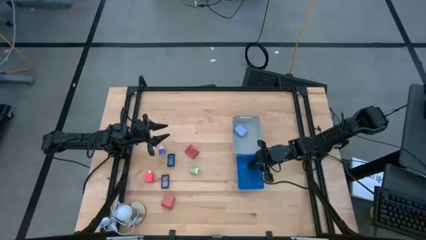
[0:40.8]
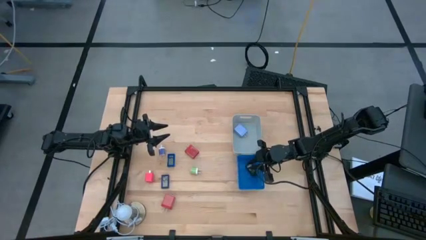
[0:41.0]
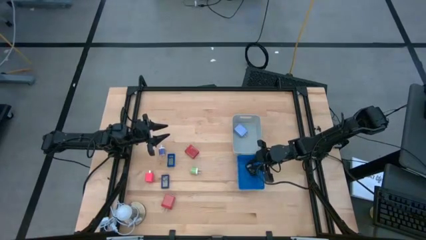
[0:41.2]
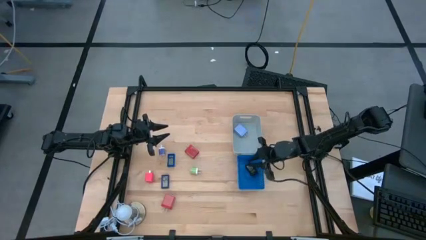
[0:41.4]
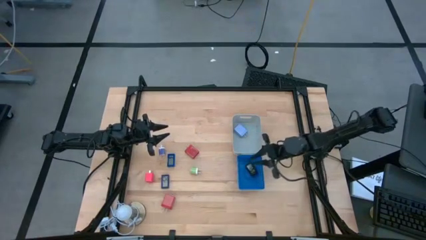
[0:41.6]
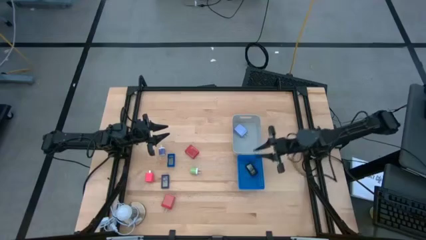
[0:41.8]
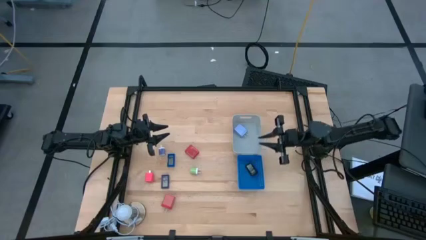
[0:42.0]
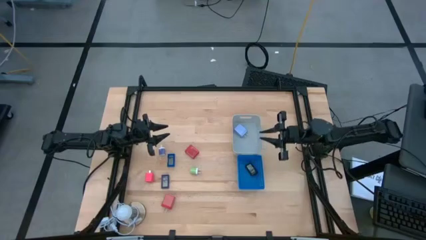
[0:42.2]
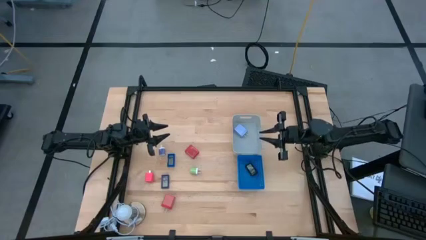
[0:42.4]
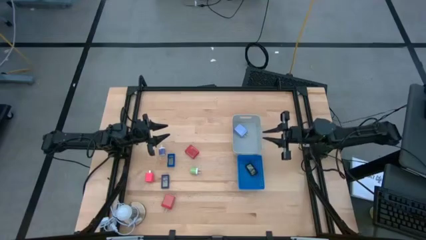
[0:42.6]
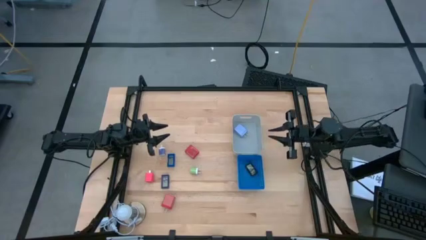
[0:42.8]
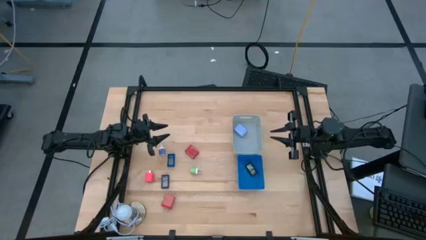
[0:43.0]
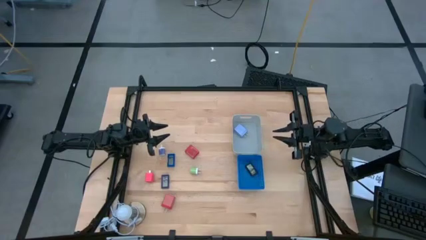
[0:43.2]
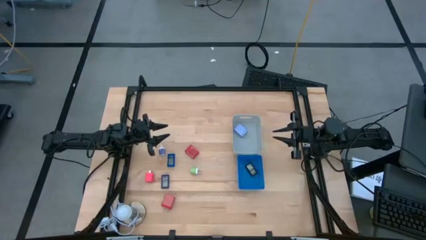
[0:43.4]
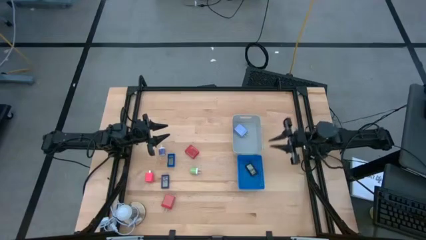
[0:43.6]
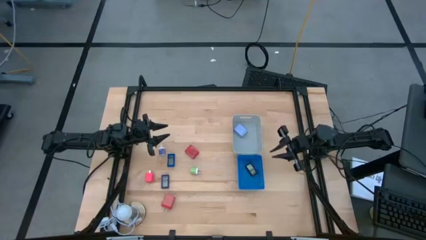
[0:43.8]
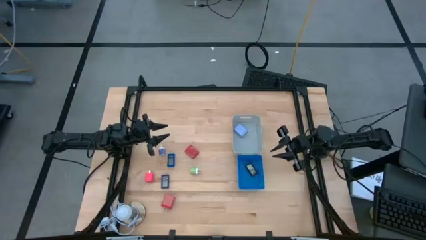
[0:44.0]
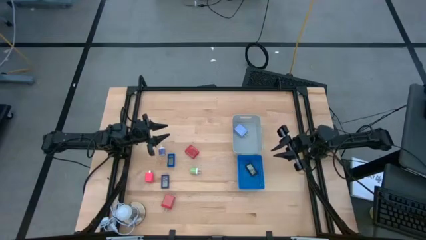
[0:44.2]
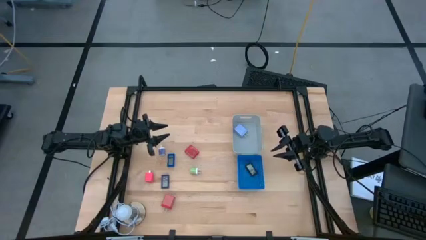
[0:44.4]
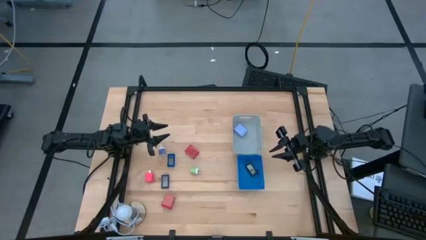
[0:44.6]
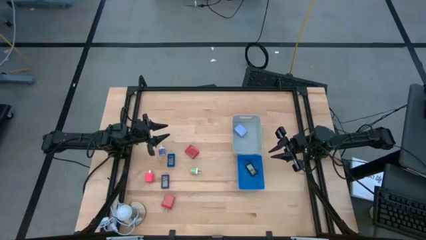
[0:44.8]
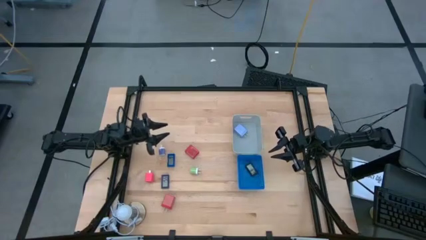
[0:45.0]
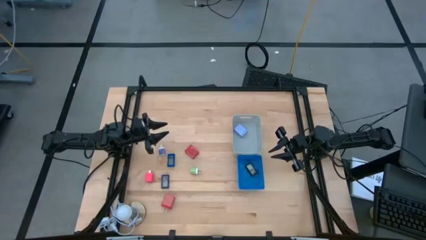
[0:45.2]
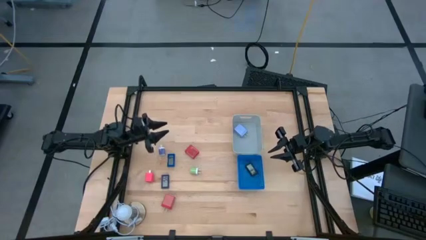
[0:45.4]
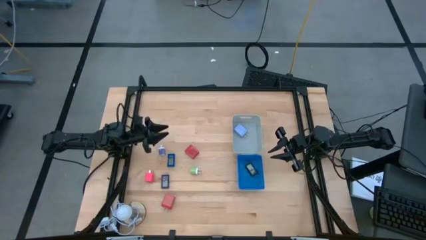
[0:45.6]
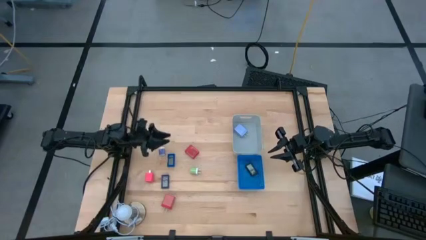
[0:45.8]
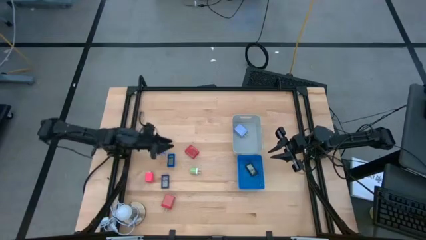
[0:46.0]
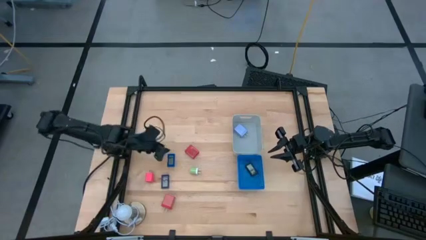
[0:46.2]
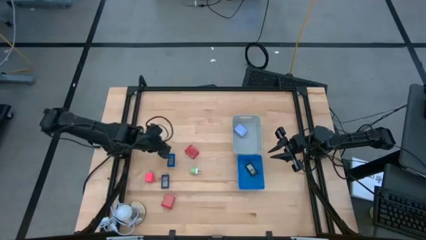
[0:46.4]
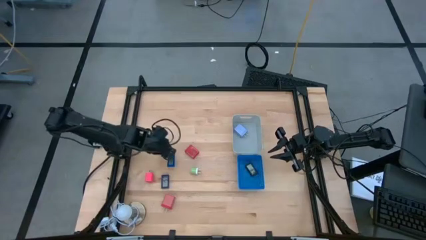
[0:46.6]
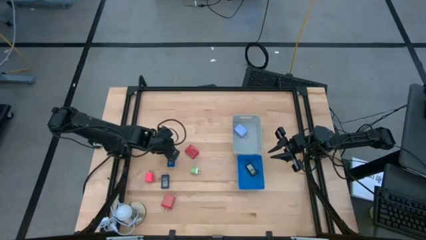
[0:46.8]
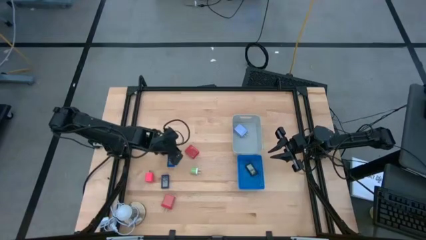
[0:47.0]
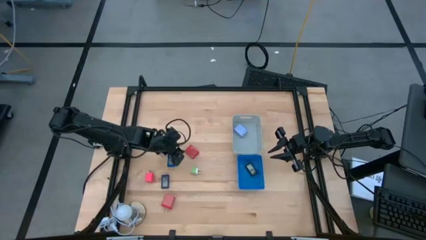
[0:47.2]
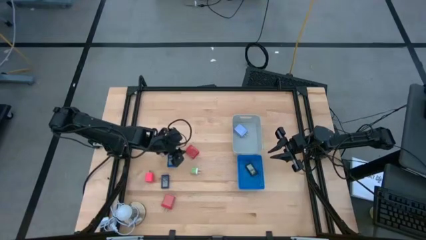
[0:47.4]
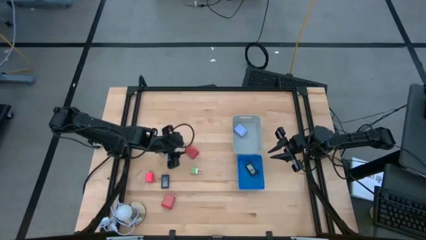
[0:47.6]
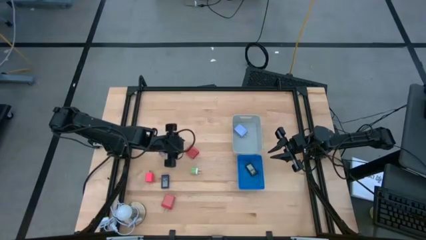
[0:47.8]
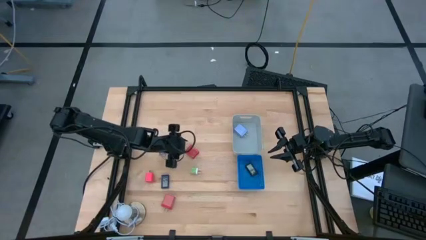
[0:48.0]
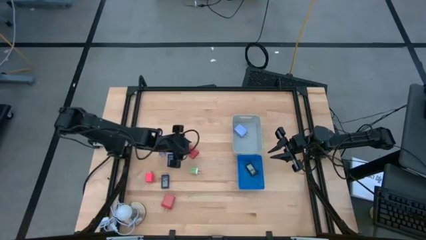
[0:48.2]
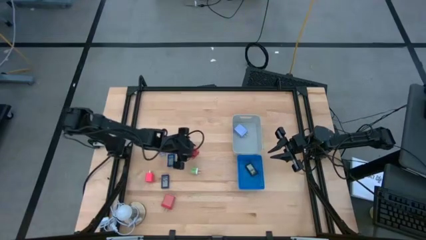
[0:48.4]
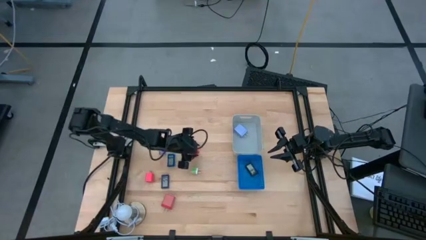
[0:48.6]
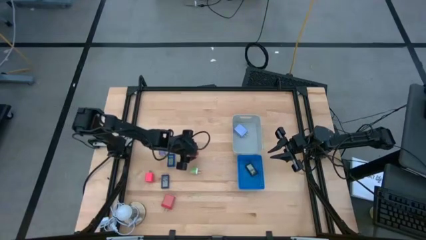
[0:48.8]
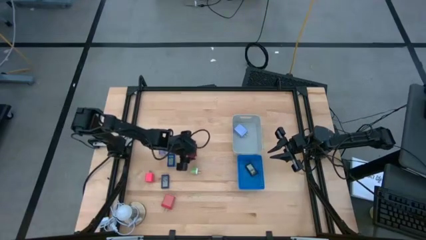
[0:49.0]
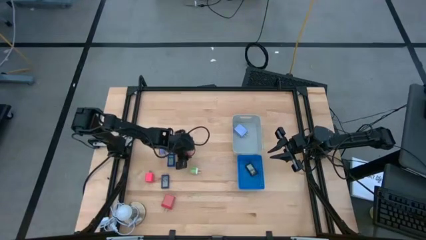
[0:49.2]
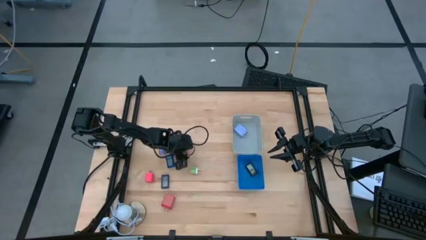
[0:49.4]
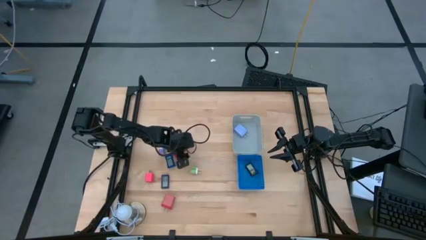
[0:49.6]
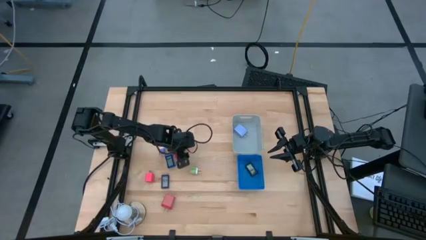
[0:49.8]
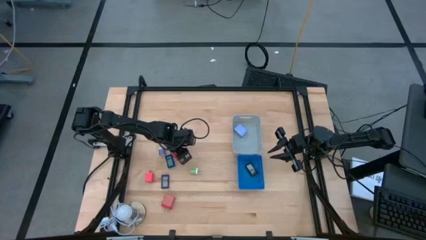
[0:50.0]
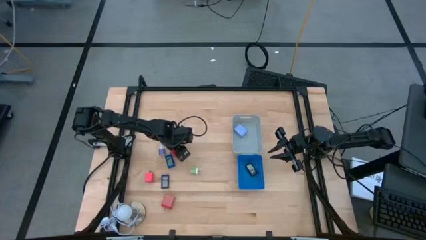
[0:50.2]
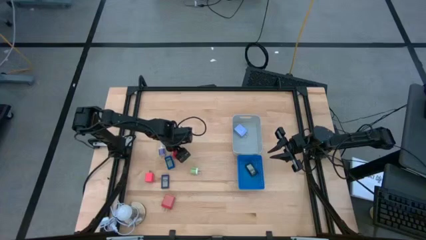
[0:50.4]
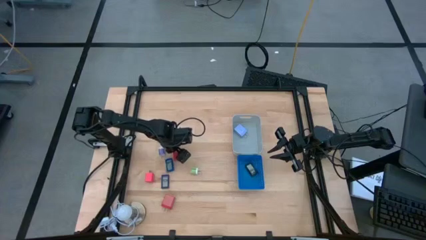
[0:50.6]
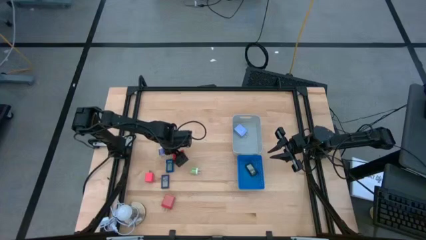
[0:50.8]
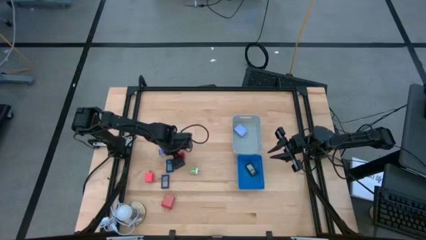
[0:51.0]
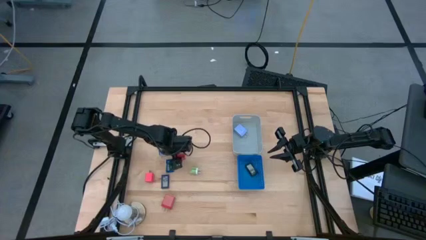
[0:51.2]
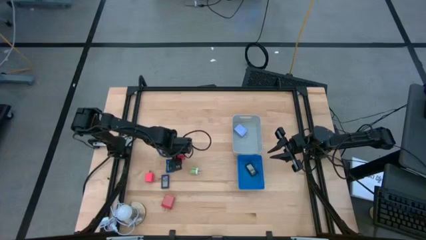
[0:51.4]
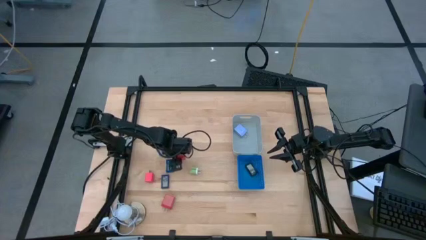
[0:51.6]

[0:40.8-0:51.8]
Task: Pick & Place Office items
Put the top red charger adapter into the gray bin

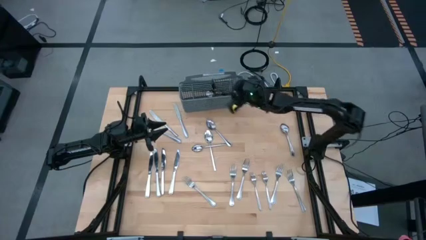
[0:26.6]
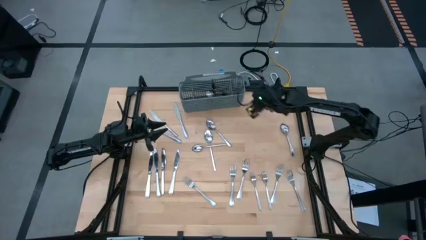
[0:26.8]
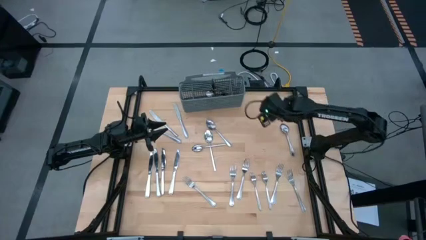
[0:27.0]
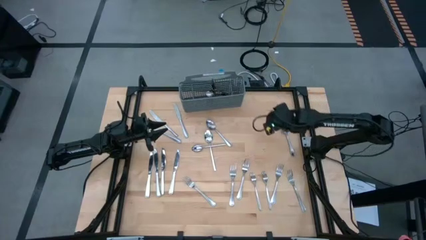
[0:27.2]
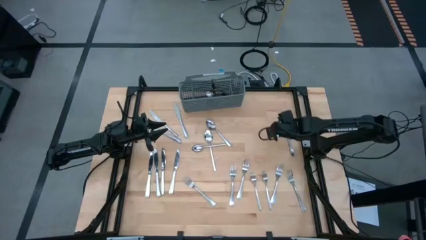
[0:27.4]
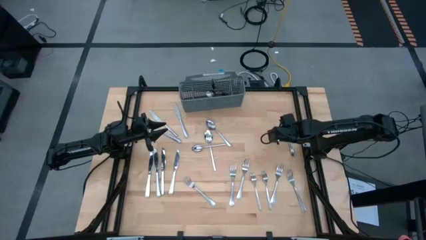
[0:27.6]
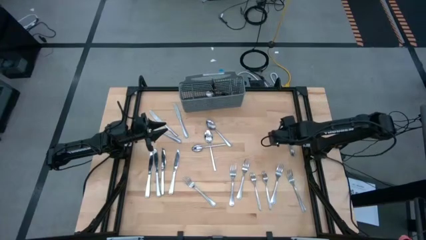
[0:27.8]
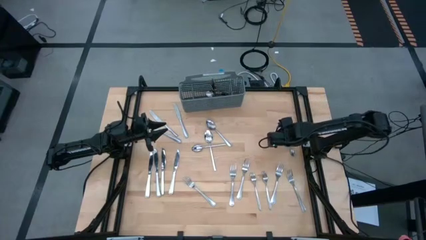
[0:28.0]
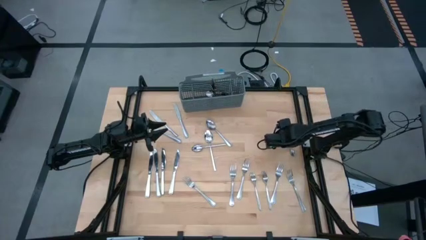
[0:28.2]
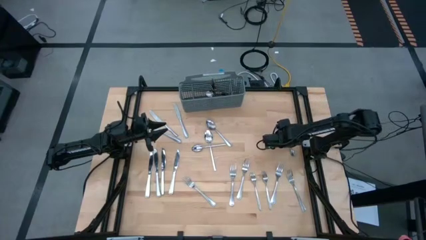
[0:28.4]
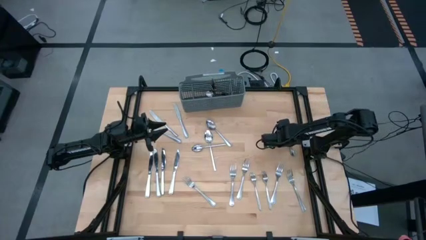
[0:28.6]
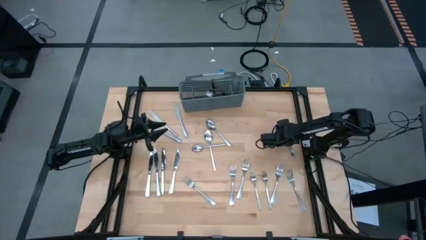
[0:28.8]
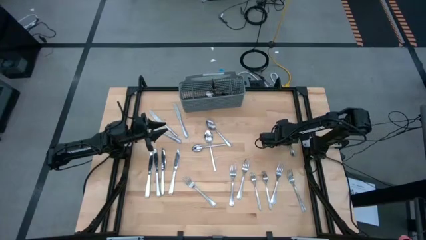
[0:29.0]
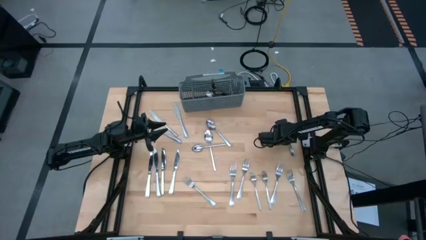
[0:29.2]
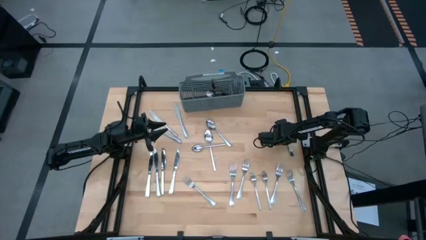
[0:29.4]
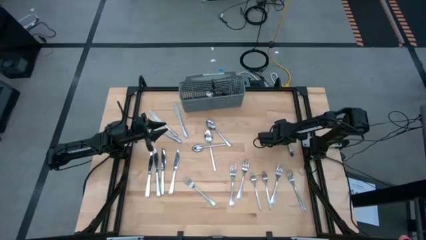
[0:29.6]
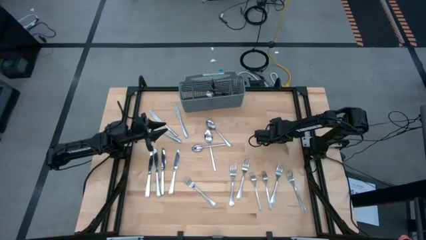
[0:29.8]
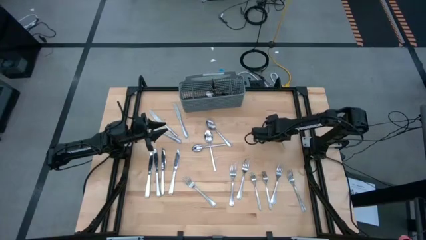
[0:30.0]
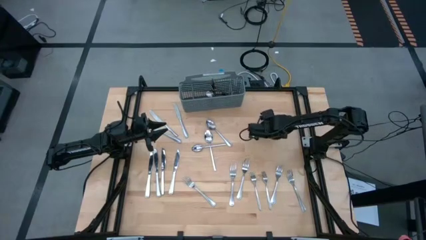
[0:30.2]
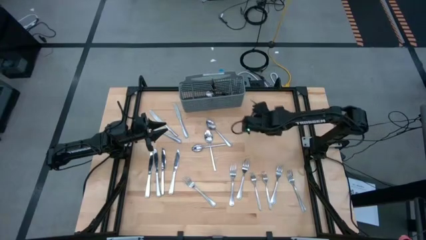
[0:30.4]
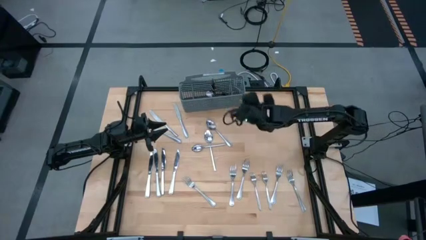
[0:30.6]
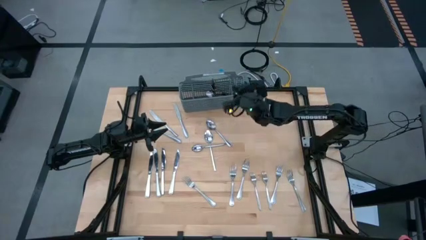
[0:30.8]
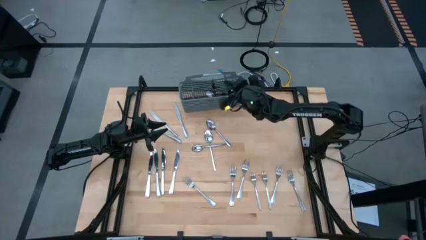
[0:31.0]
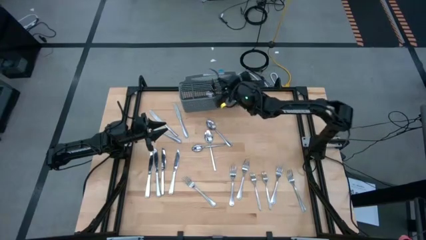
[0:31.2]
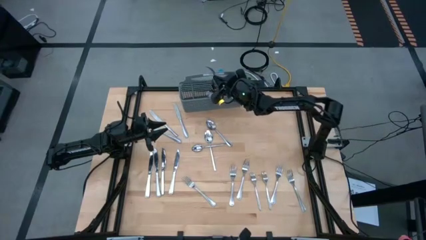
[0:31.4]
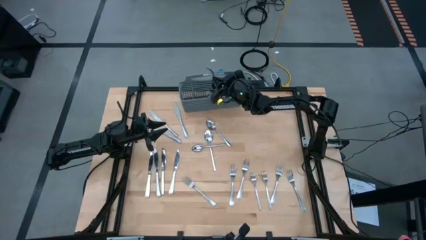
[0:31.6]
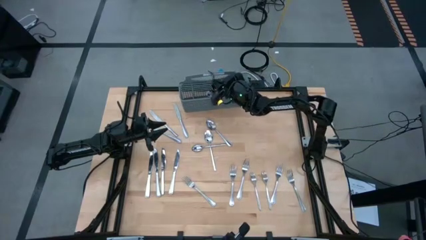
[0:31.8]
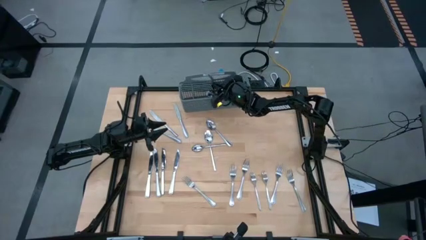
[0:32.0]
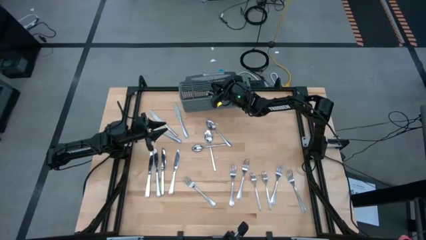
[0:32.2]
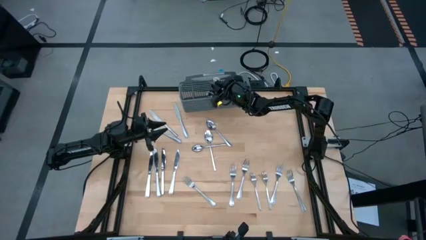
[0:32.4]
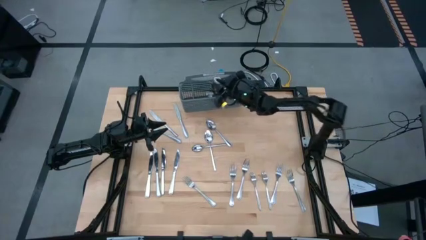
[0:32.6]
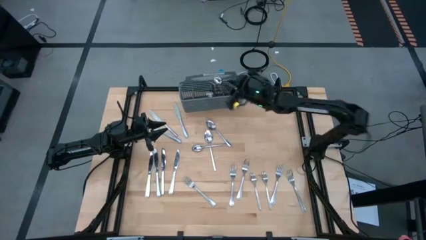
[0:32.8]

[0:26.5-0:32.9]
Task: Sort silverware
Put the silver spoon into the gray utensil holder
